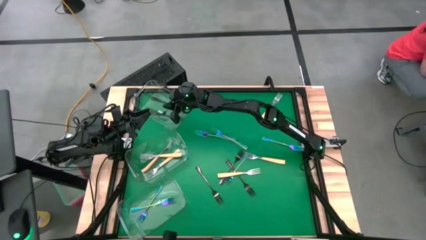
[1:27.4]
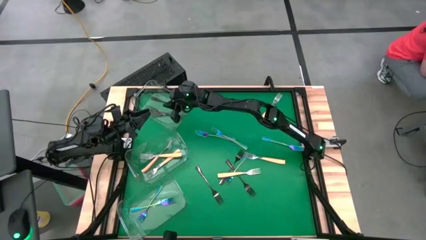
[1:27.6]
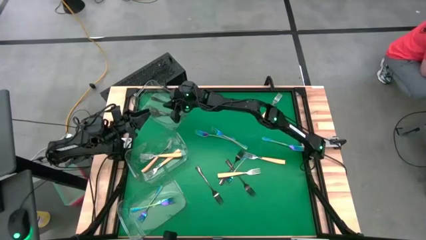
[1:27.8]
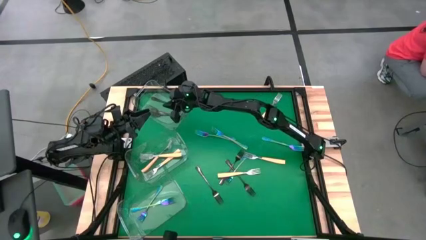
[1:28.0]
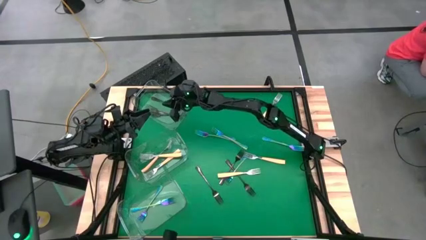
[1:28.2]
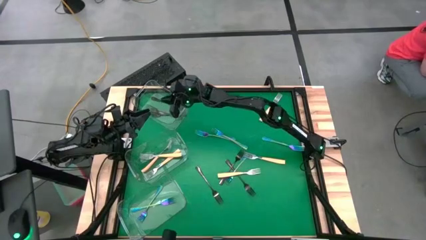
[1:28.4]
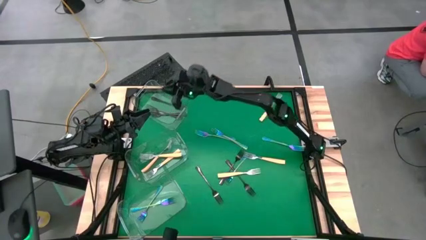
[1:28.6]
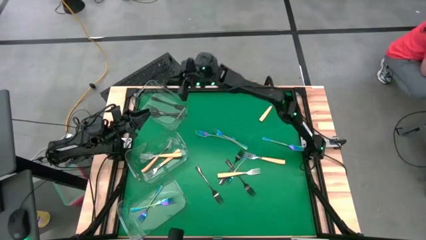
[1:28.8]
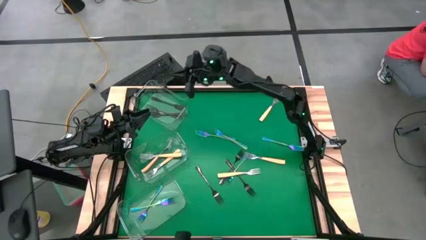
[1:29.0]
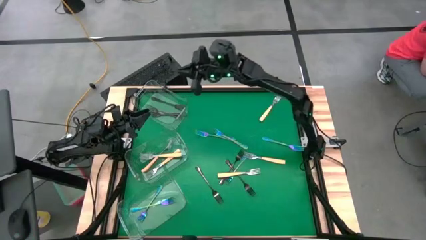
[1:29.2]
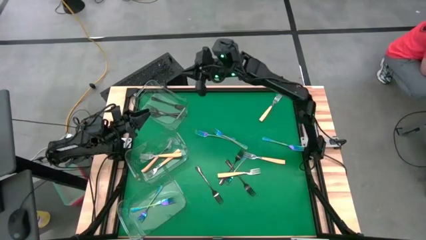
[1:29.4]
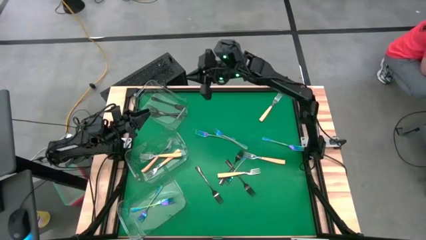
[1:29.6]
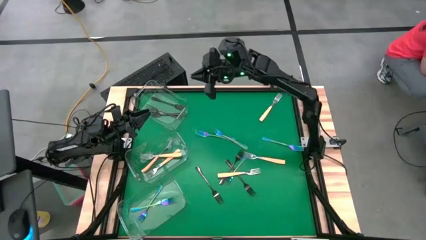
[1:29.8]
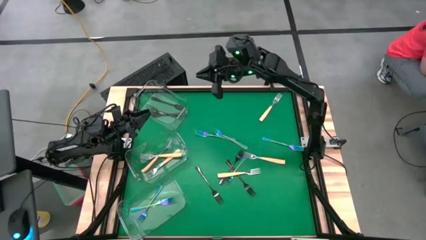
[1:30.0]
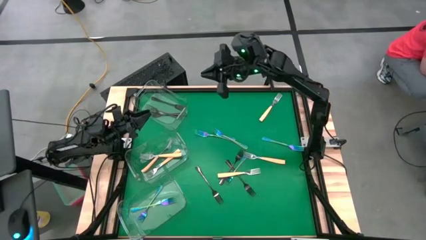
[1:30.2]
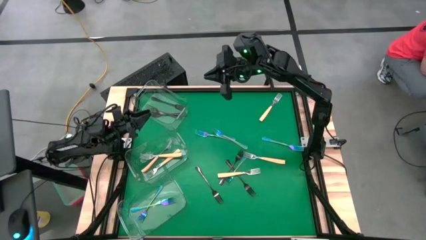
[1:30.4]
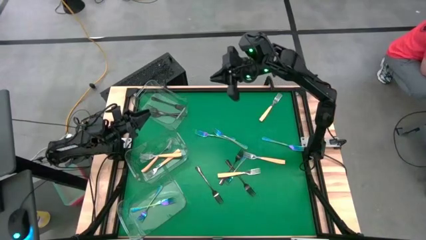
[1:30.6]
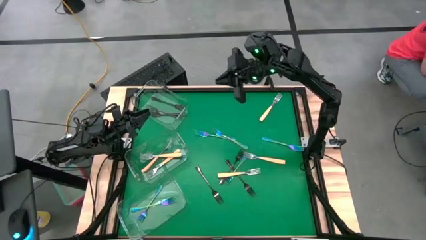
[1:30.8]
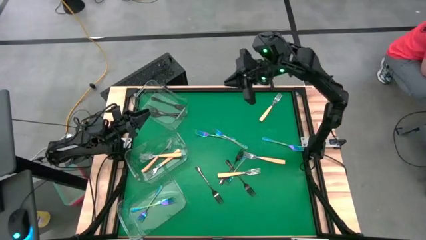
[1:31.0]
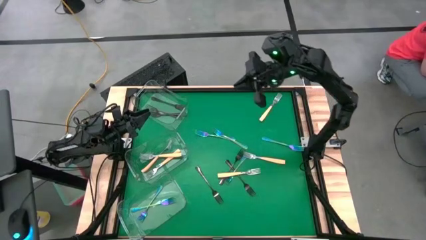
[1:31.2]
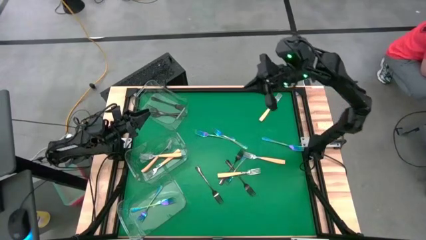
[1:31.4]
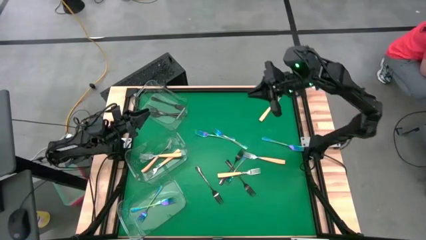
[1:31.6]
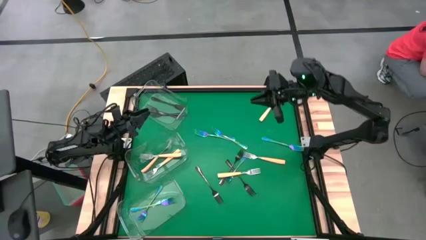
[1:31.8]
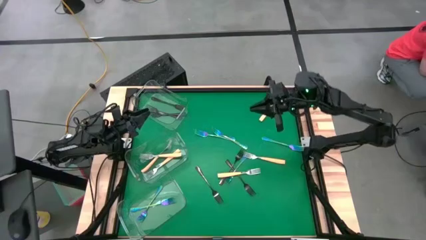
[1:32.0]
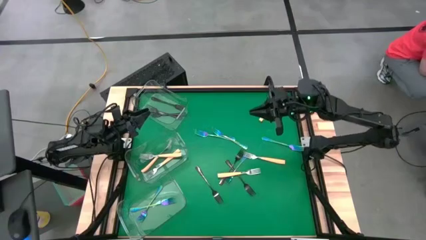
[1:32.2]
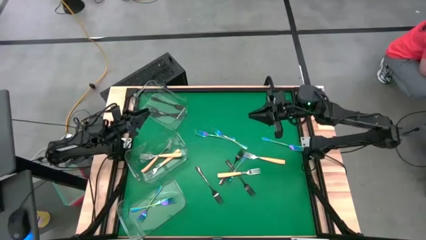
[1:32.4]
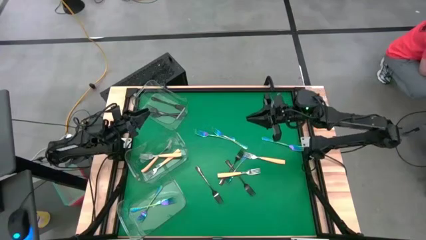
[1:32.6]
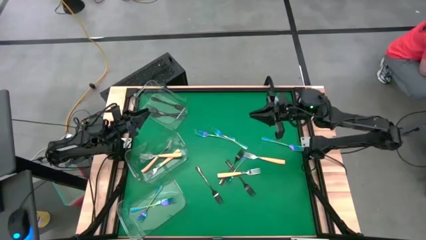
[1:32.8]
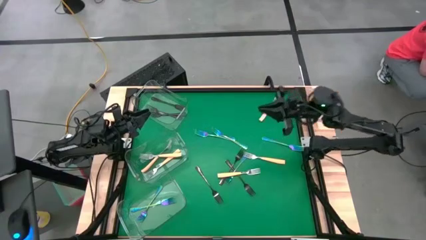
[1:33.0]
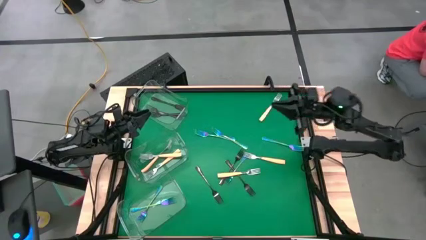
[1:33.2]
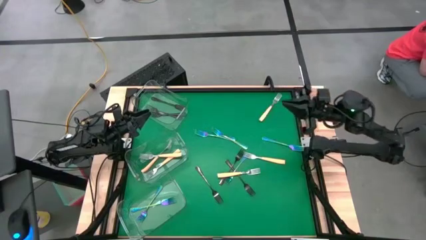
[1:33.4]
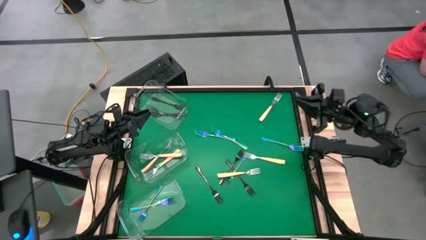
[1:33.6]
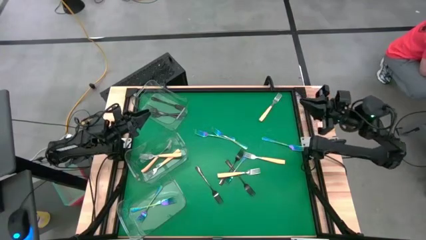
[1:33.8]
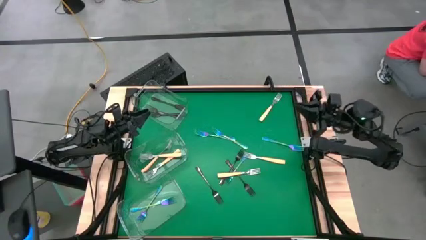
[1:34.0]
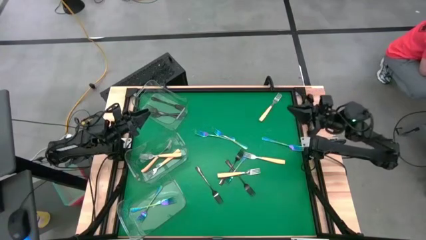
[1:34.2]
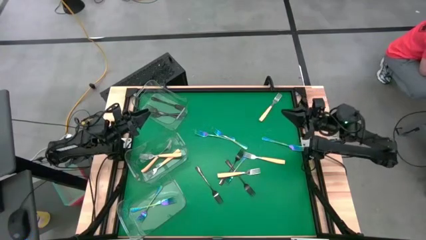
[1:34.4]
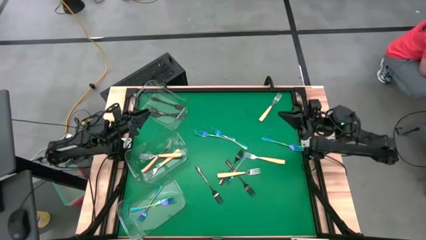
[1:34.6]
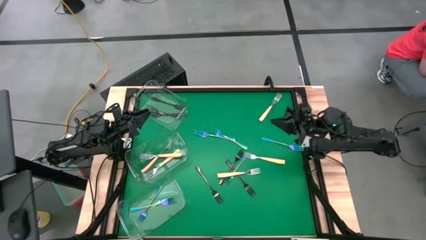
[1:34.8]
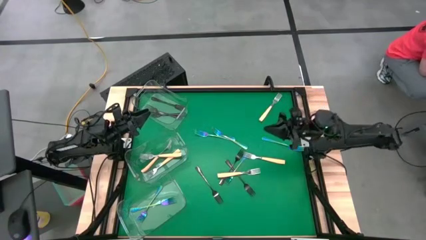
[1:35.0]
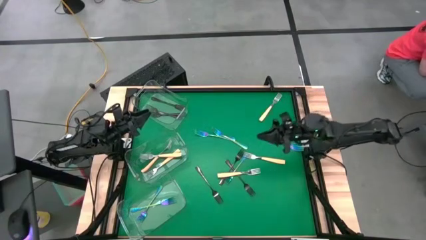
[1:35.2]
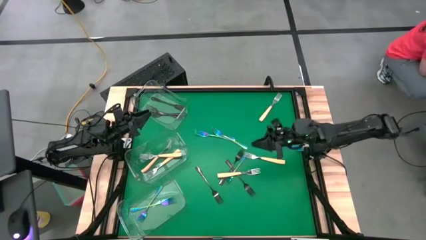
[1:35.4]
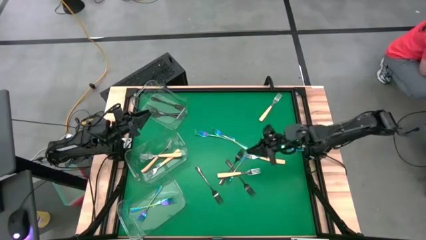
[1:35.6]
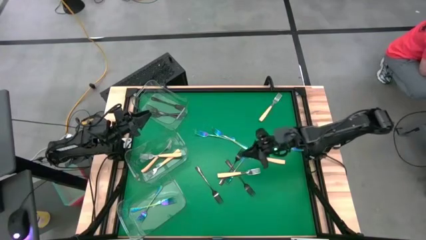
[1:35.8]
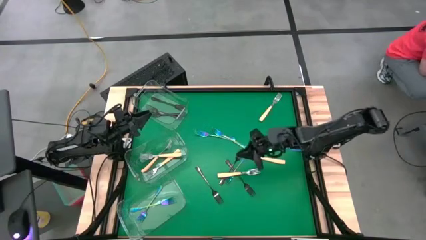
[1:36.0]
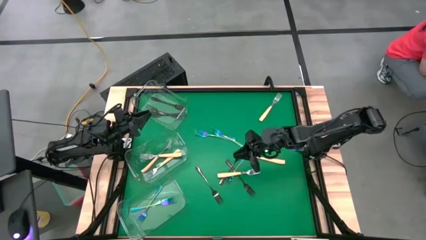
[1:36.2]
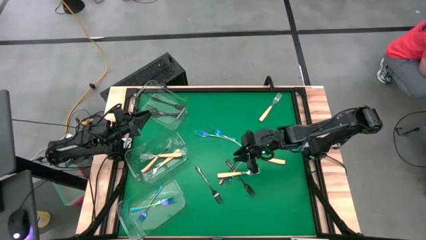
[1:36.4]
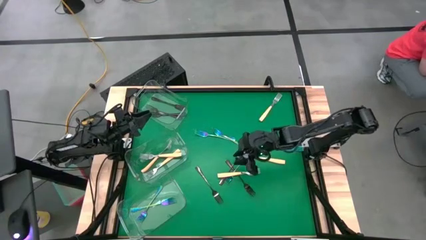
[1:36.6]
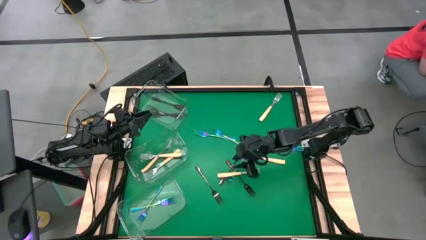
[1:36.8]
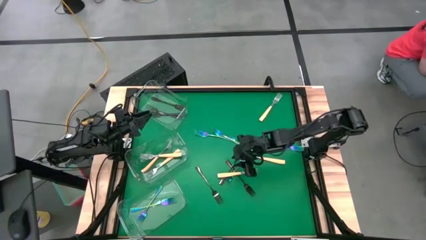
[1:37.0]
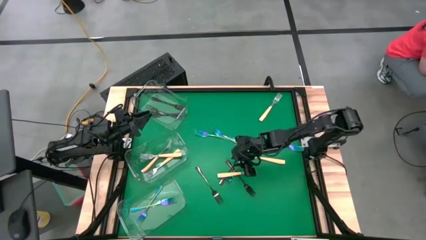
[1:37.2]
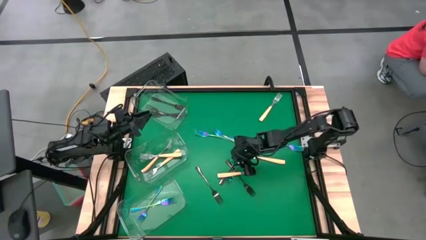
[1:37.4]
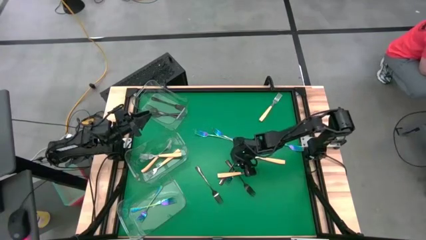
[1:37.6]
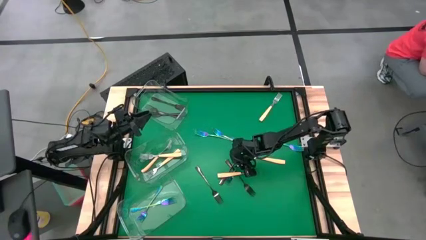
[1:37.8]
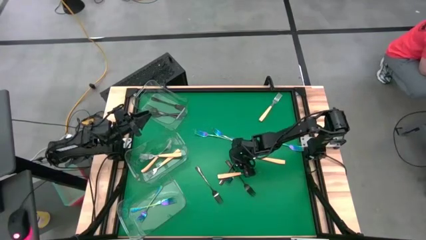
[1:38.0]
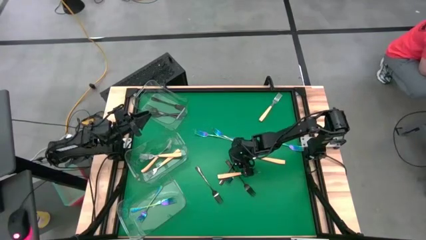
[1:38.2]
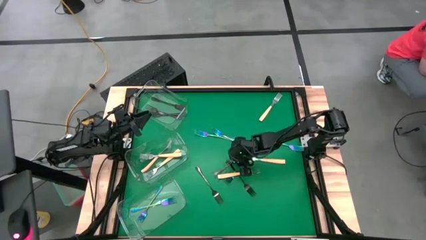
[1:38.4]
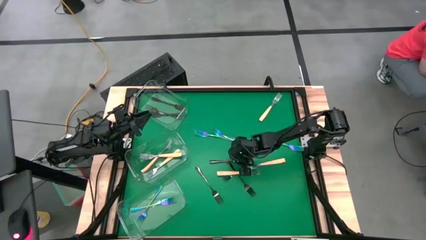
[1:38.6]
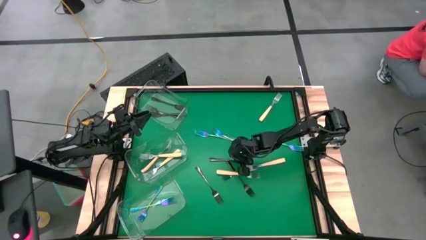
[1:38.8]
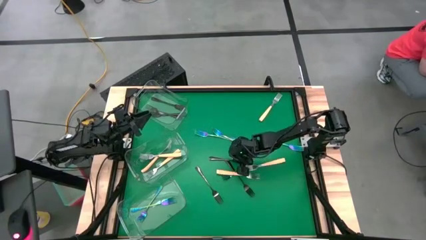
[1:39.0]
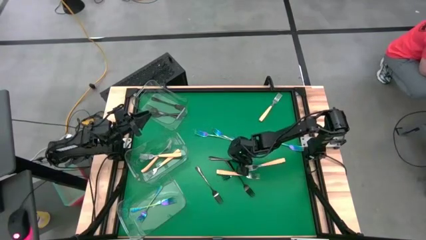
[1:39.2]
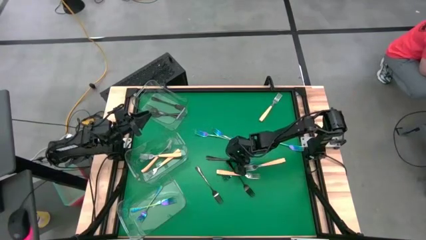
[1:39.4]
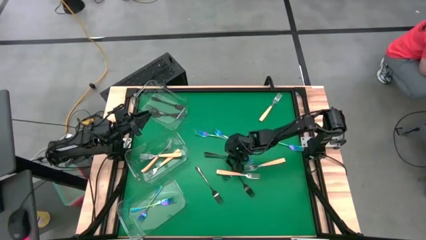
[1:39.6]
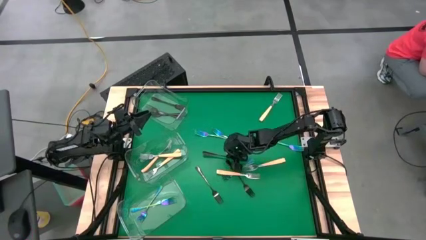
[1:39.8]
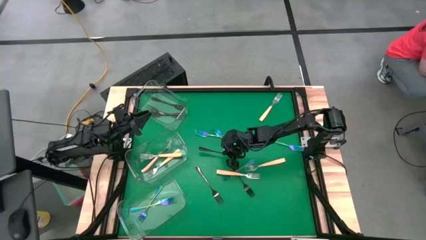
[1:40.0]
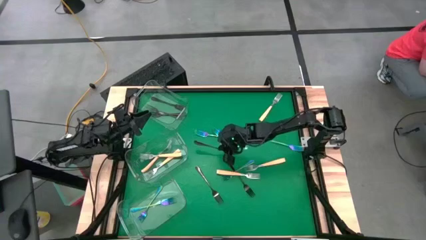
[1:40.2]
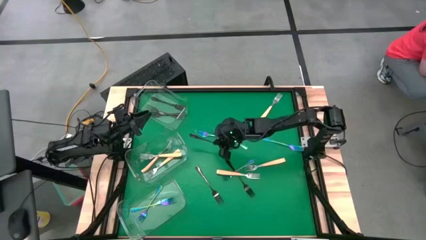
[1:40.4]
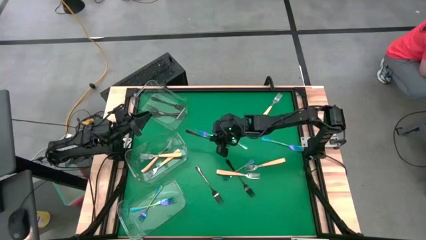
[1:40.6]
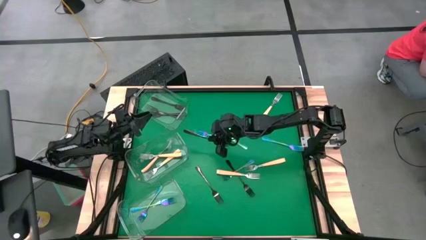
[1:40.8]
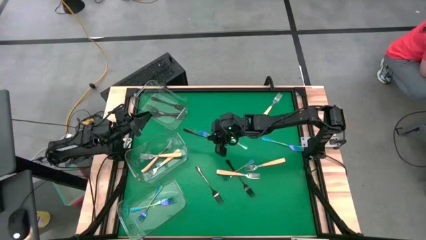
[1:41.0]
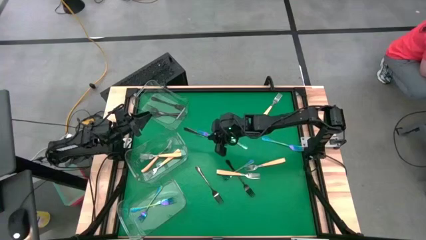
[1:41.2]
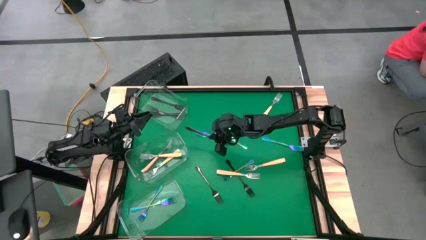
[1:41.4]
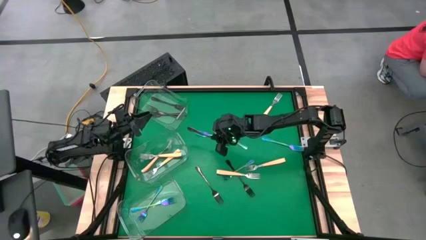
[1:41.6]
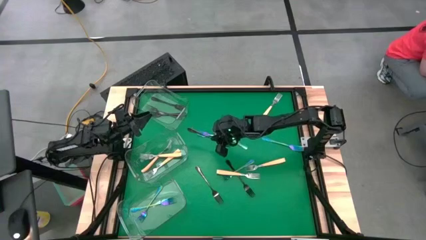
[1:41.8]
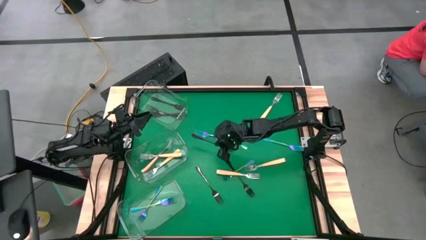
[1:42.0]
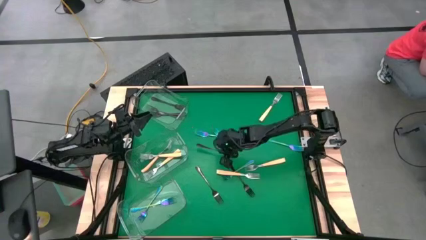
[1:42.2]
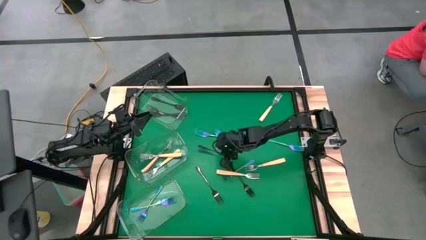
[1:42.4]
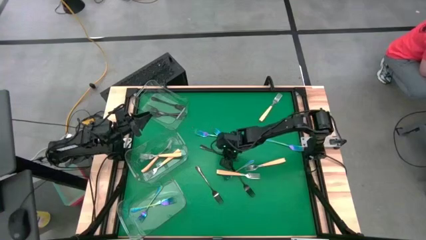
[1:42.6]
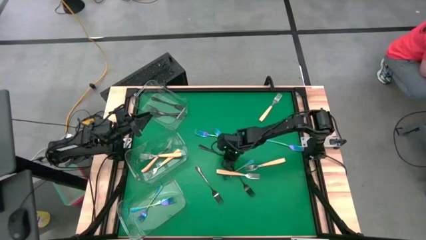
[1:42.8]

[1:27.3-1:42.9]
Task: Sort silverware by color (type)
Put the black fork into the top transparent bin

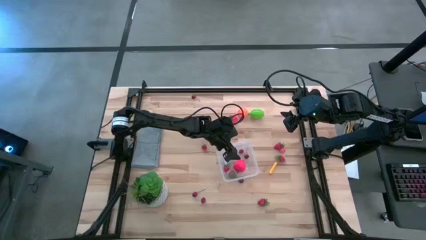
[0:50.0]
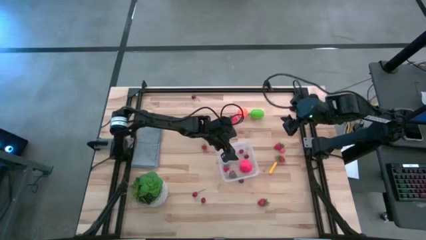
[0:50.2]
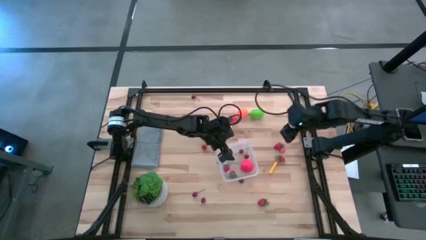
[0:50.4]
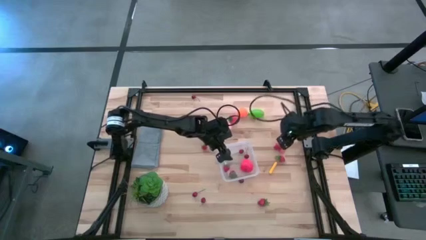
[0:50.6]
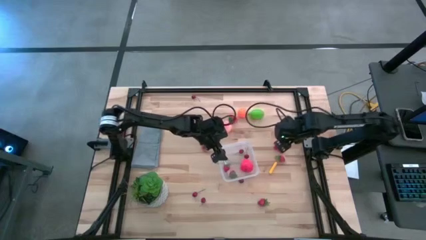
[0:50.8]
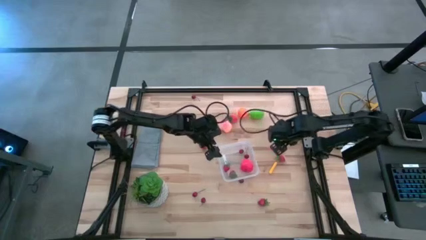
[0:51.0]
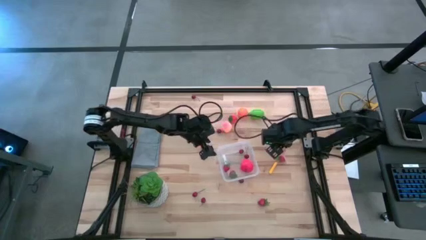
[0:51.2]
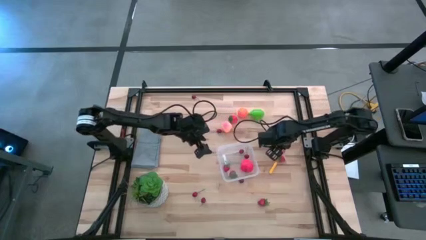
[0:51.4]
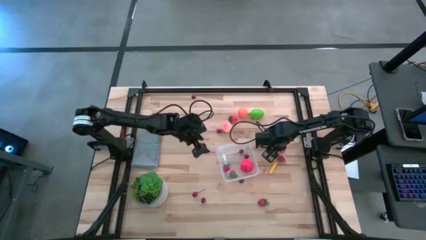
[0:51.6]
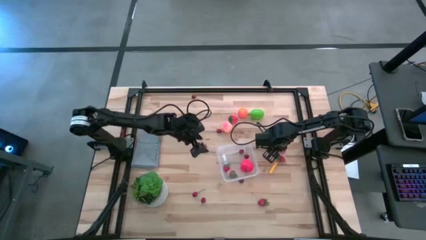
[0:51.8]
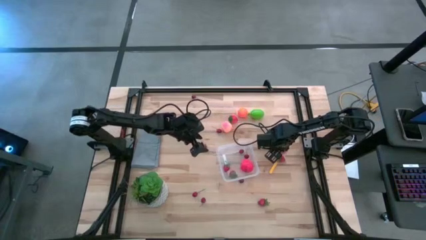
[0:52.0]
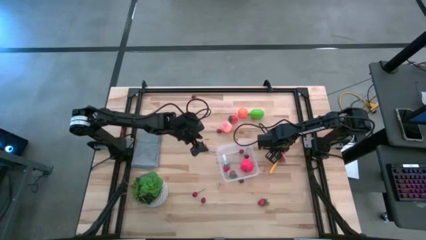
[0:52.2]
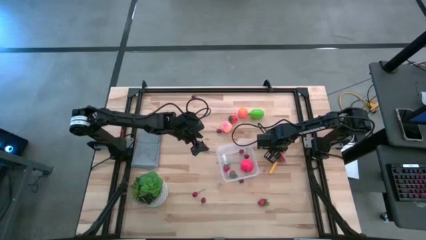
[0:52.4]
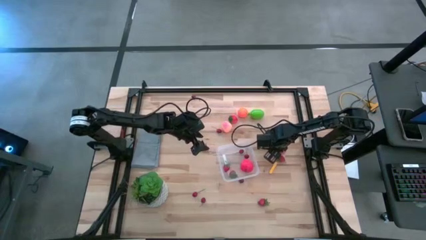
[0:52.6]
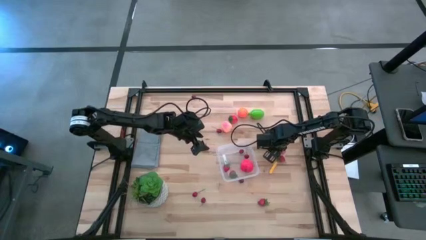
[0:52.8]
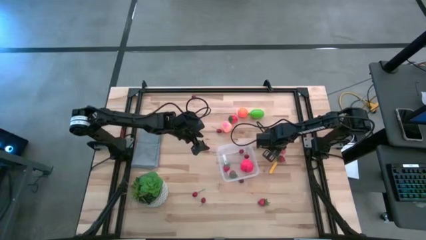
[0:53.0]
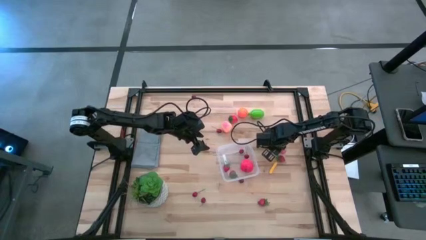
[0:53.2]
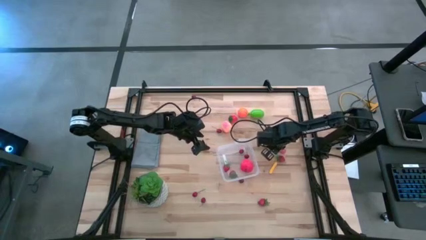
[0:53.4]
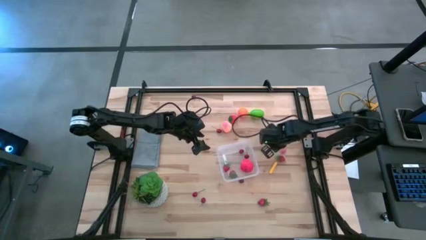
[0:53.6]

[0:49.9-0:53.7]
Task: Pick and placing Produce into tupperware
Put the strawberry into the transparent bin
